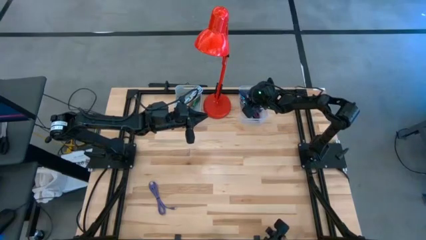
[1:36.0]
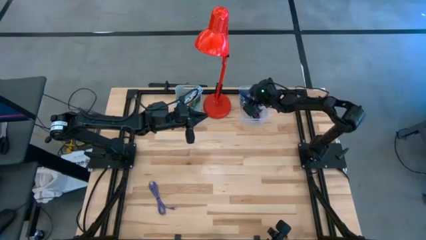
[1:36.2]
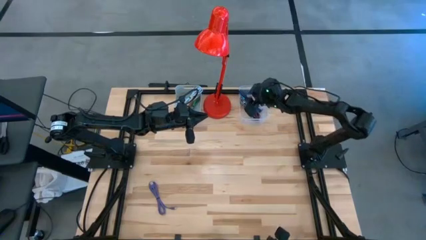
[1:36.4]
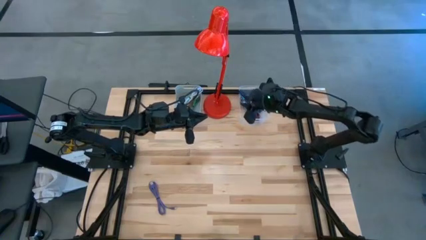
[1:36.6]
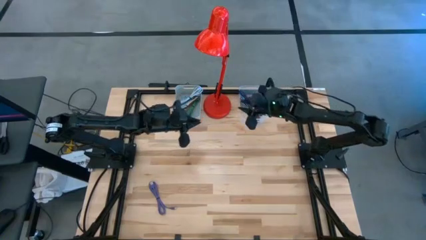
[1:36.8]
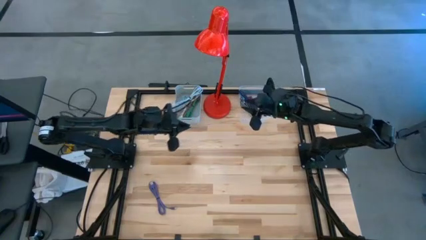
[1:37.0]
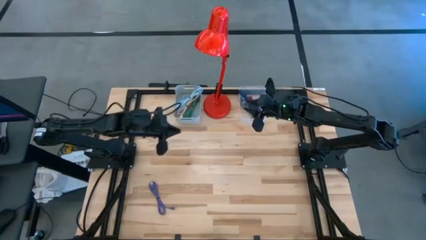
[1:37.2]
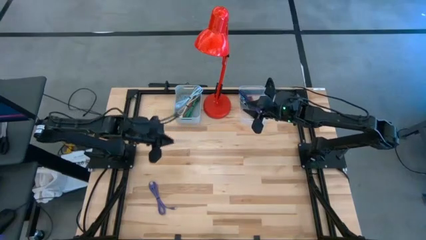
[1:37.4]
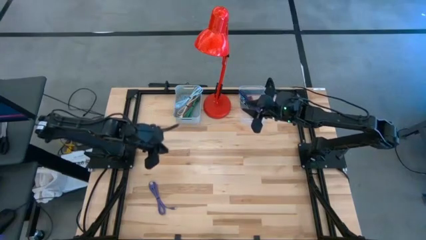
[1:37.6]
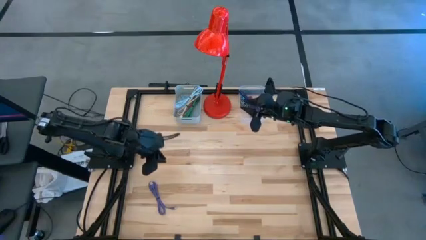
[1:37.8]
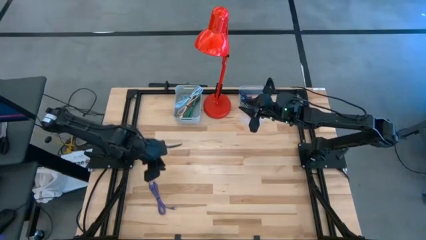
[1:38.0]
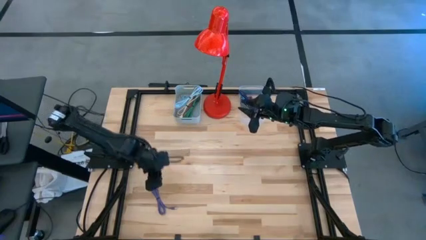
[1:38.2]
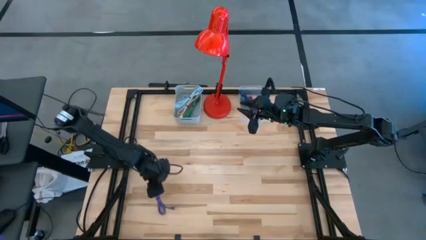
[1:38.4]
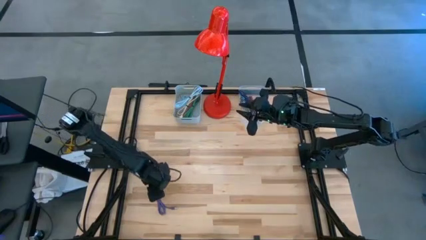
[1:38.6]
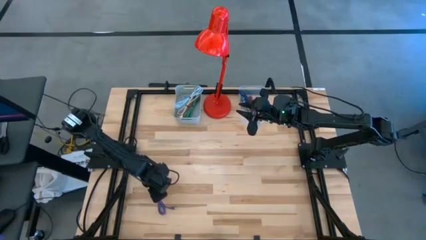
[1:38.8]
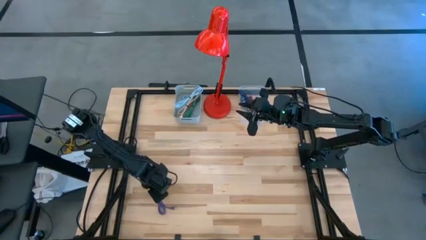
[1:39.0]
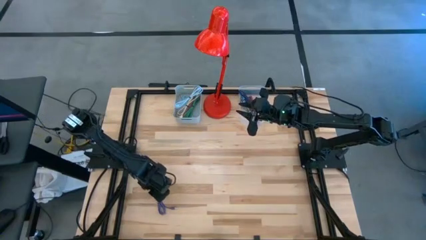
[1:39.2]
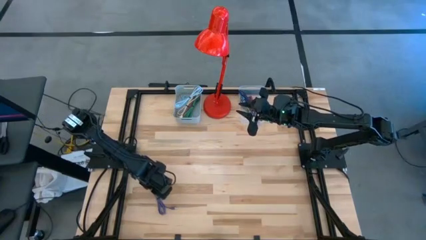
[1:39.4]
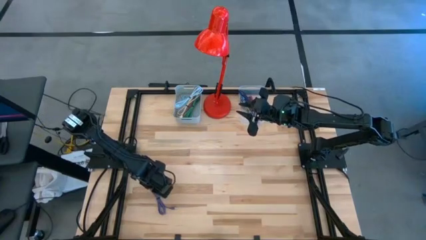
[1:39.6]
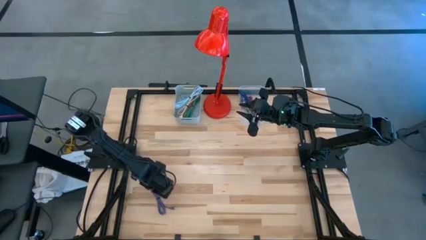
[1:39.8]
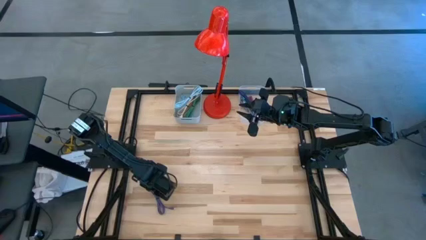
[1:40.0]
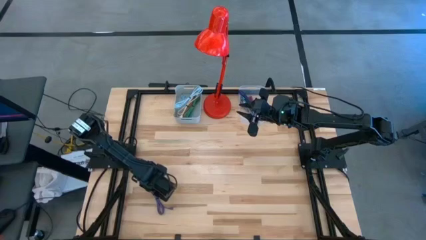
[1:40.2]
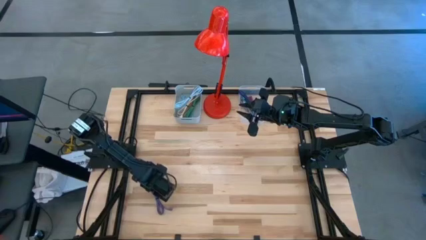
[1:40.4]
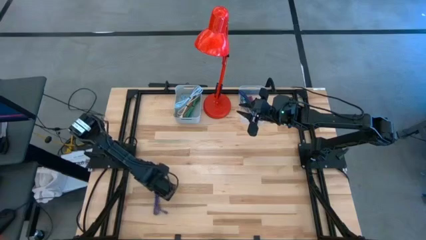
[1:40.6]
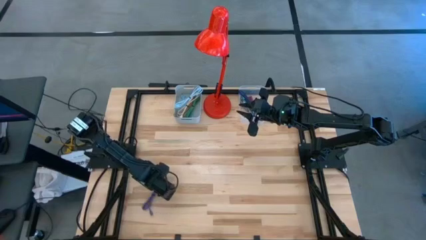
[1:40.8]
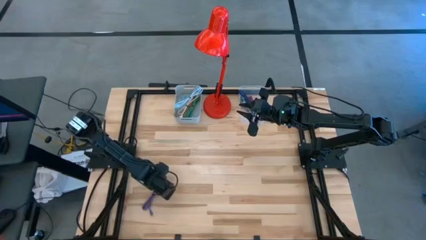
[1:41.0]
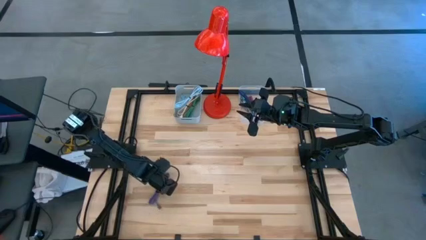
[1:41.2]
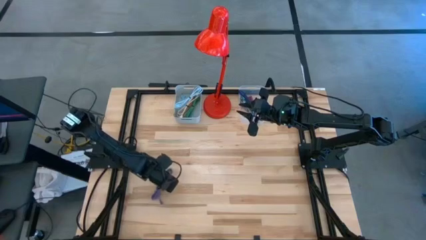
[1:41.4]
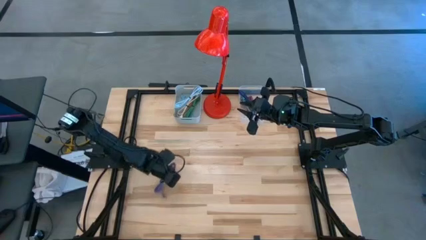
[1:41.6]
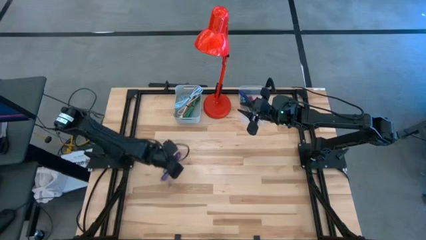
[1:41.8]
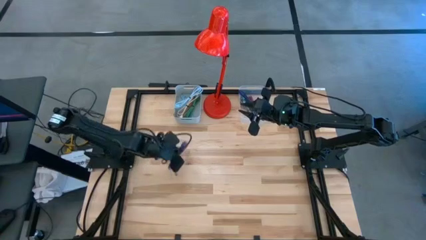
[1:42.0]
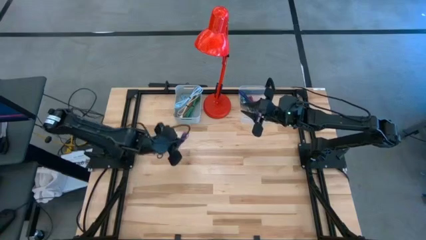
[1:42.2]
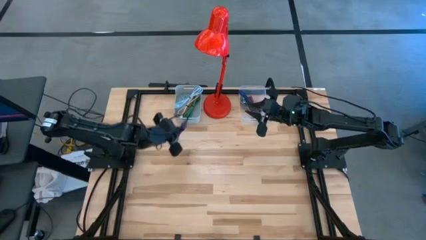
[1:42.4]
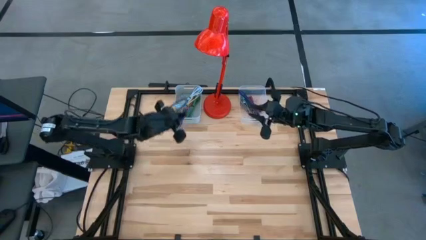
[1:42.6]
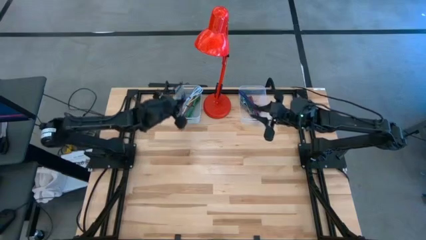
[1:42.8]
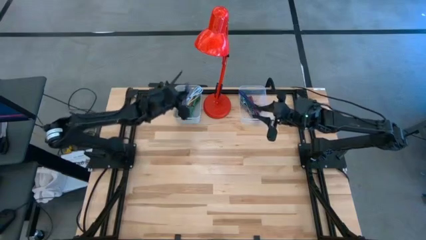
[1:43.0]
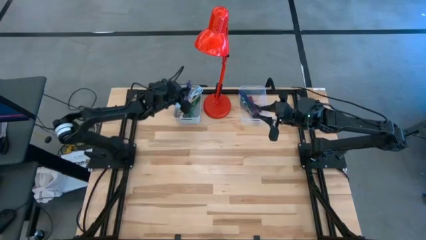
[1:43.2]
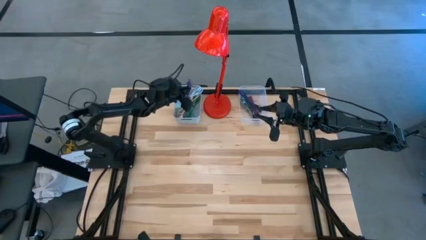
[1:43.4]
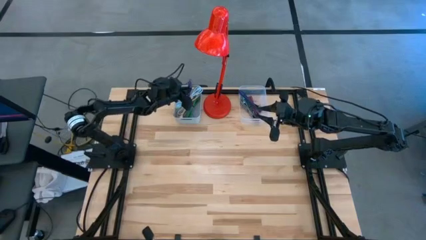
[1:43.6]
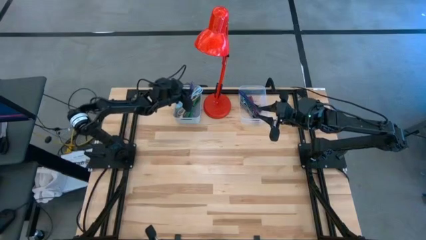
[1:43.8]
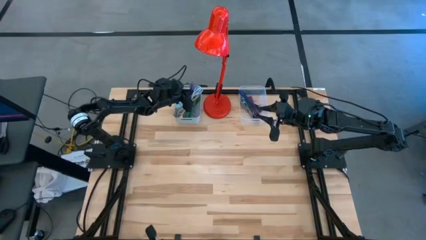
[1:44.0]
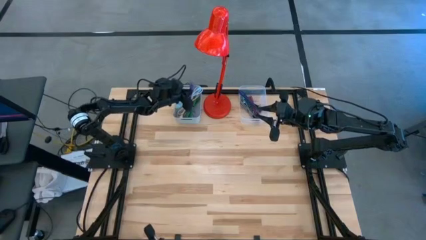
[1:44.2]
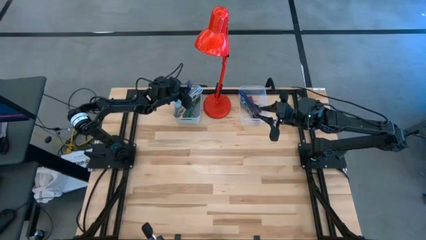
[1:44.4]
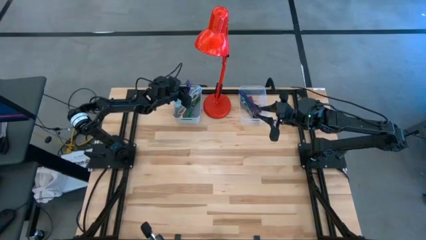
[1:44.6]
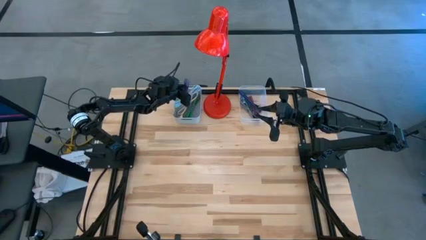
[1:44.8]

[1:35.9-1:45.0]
Task: Pick & Place USB Port
Put the purple charger cable into the gray bin

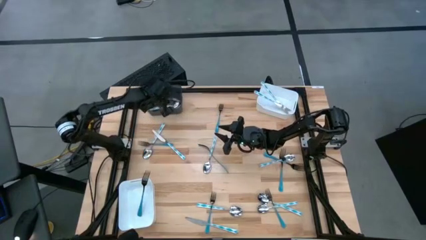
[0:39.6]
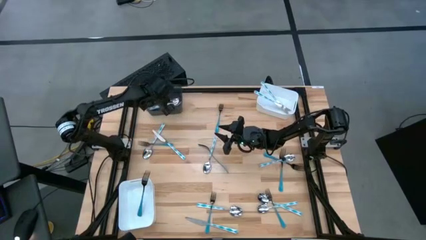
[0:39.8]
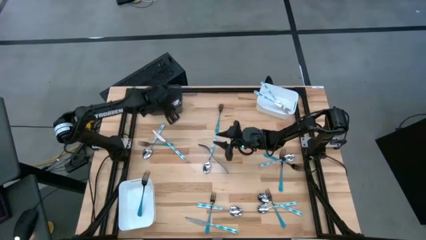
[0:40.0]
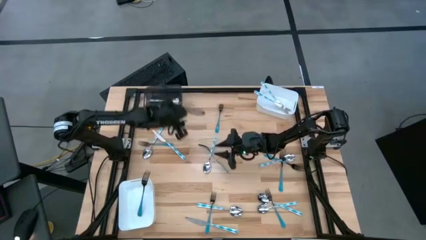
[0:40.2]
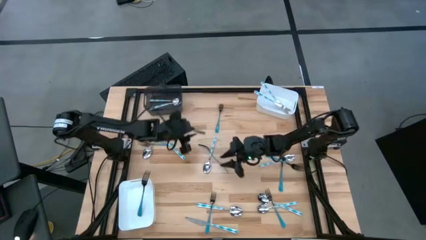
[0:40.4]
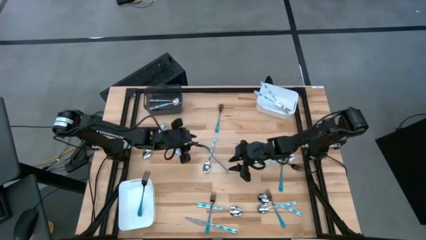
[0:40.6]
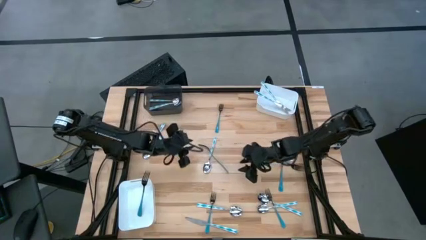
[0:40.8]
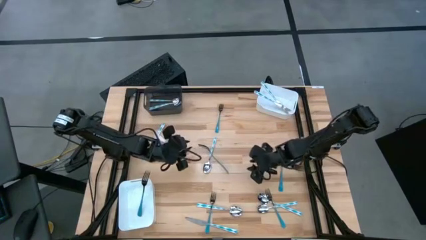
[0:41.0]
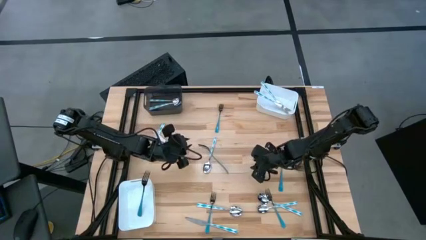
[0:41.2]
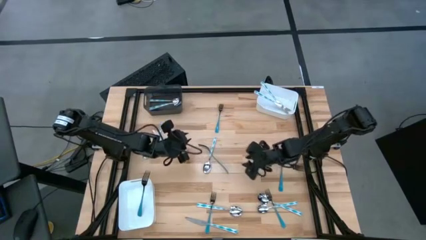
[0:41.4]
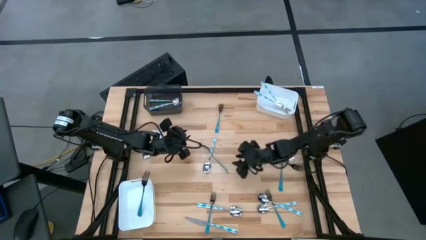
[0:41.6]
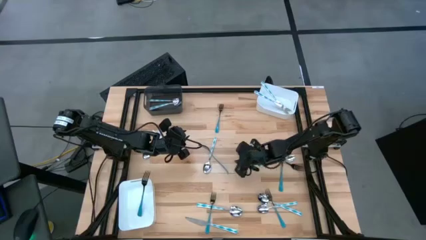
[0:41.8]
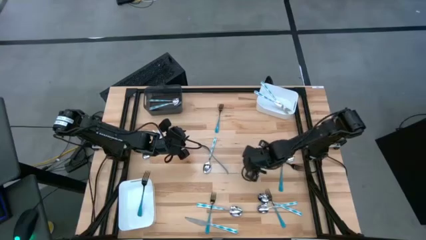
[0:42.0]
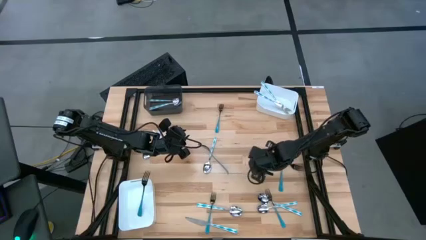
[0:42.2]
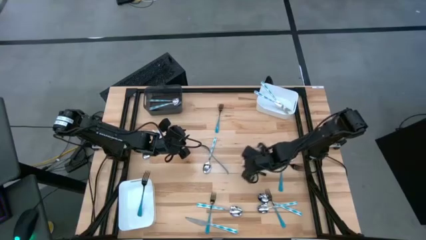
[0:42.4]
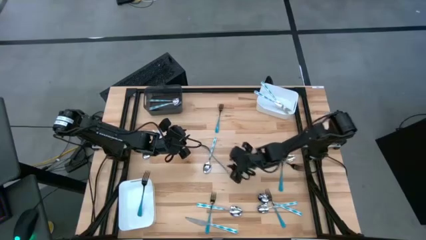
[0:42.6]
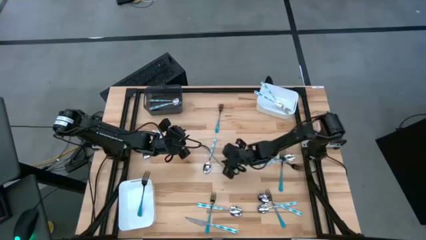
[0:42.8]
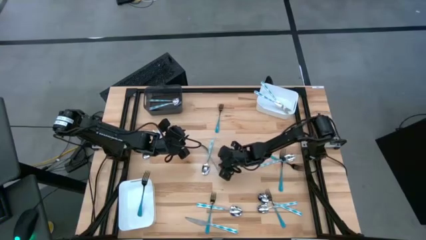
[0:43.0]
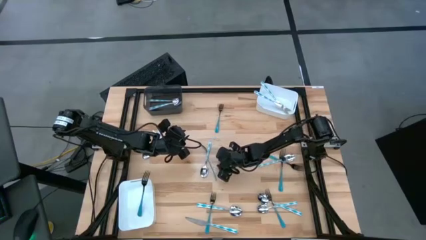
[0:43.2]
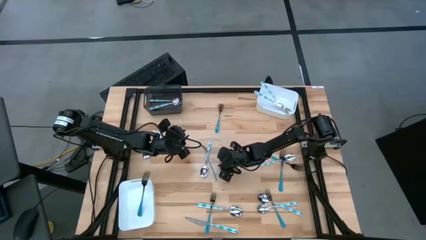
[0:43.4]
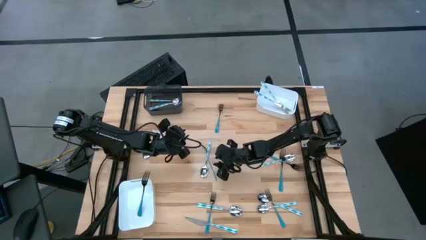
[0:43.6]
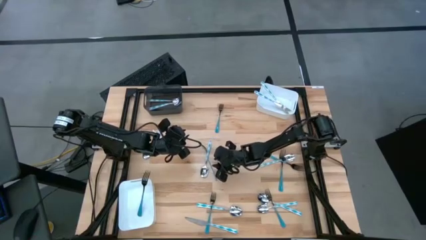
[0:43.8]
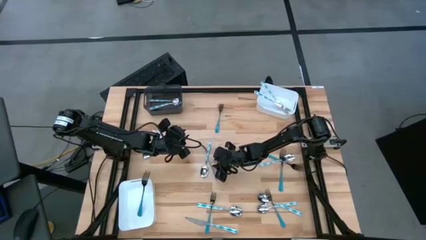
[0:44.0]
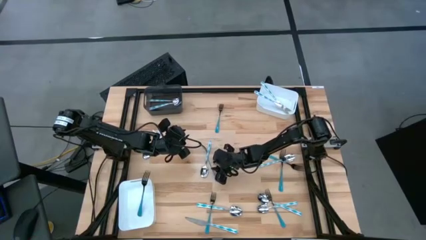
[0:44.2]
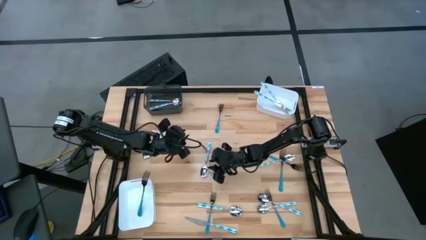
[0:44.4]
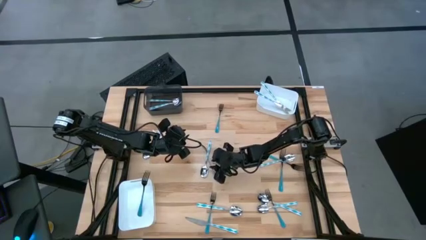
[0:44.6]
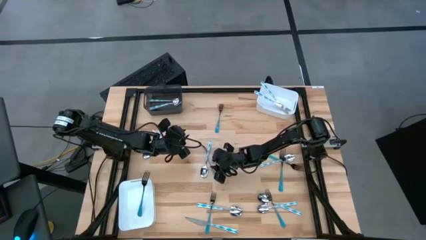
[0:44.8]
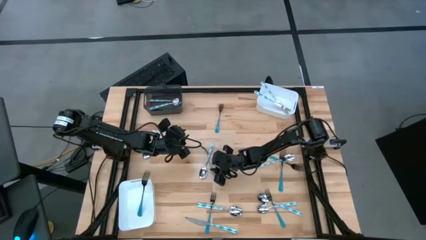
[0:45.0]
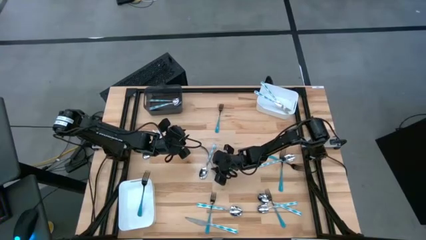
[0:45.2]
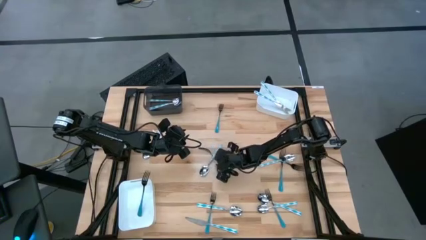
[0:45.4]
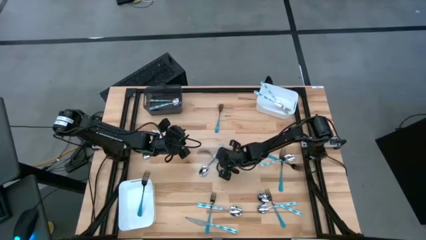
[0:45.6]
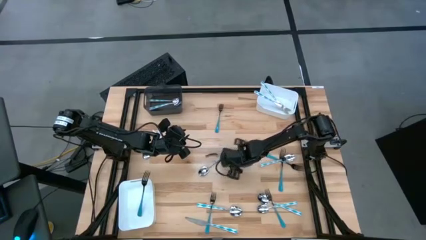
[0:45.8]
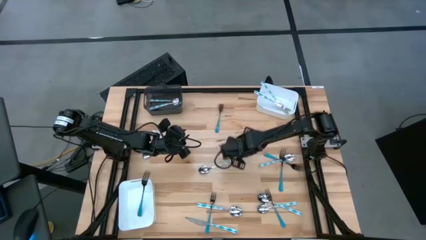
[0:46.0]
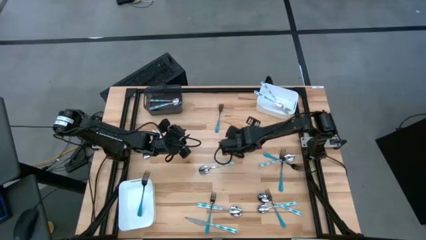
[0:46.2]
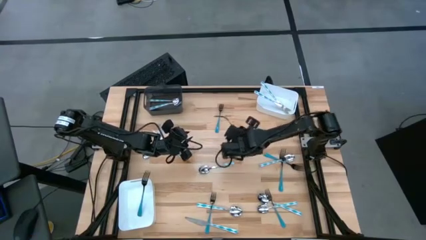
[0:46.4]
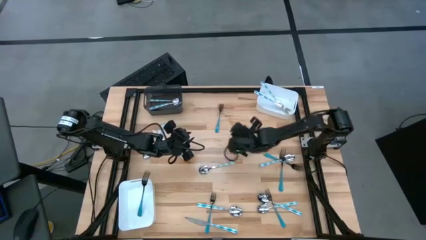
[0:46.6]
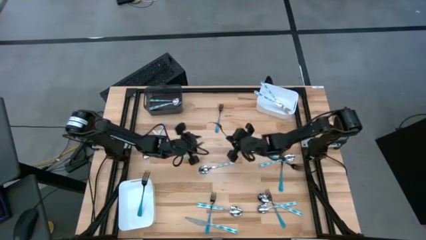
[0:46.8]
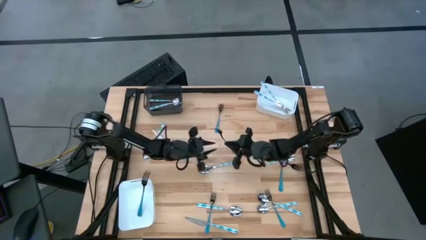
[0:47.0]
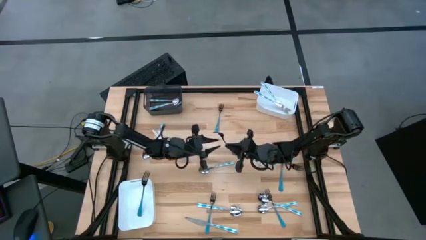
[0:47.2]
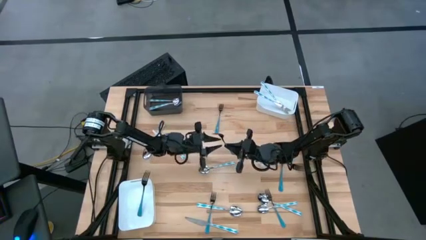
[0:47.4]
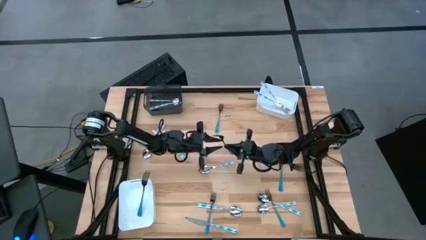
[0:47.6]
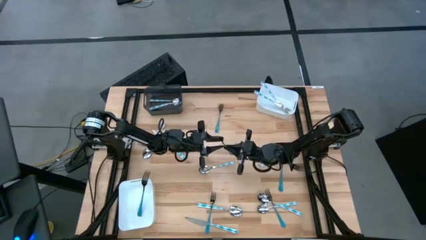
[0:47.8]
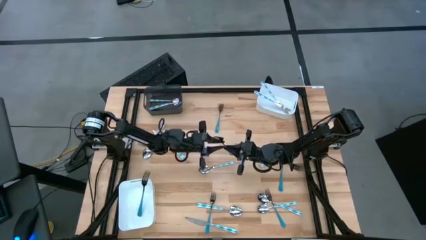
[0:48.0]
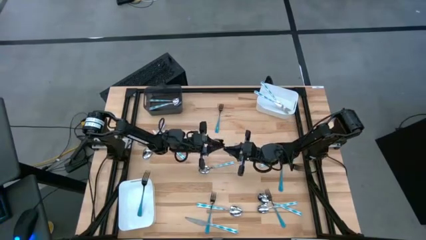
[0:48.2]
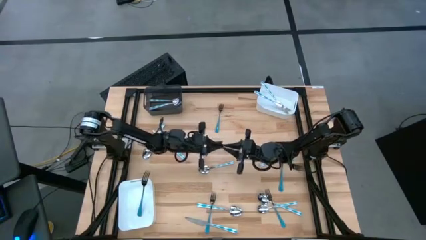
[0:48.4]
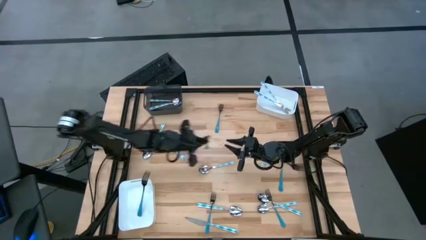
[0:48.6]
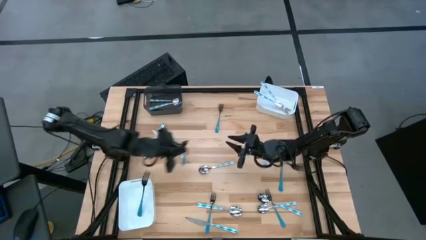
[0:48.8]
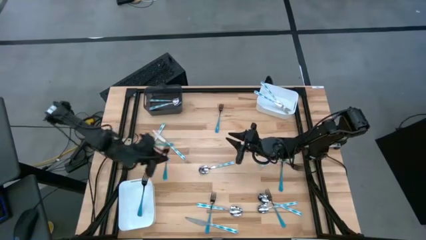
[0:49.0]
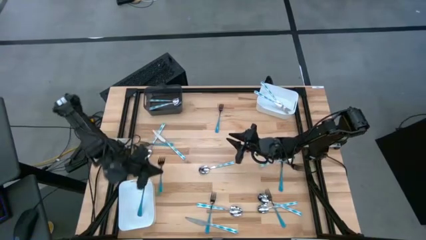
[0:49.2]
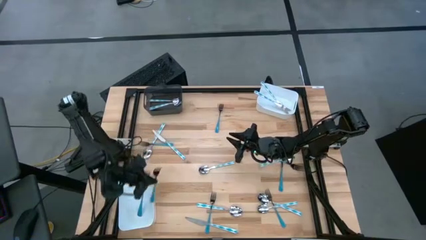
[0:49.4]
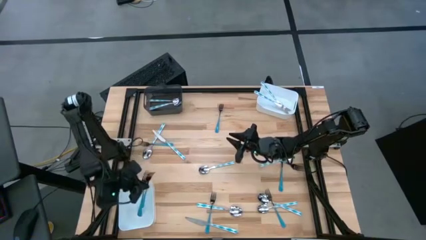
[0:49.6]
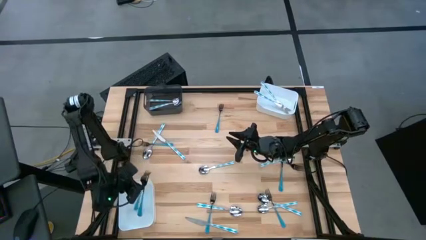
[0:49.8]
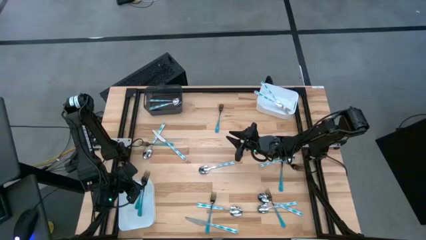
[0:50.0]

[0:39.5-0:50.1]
Task: Sort silverware by color (type)
Put the blue fork into the bottom white bin
